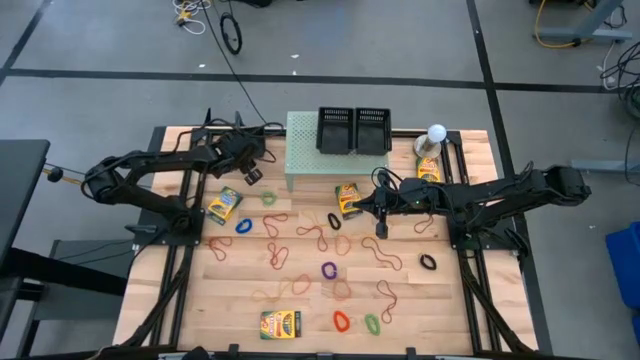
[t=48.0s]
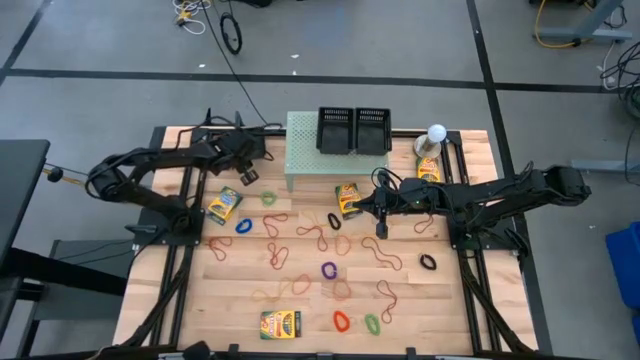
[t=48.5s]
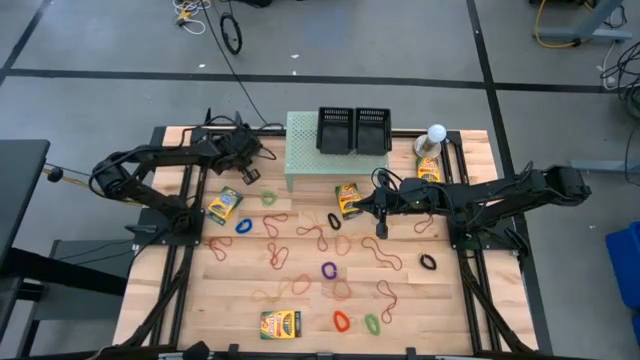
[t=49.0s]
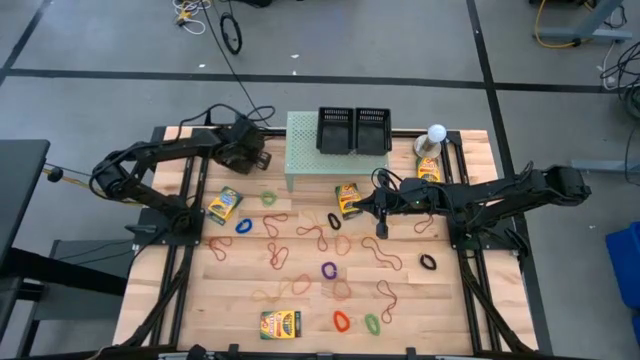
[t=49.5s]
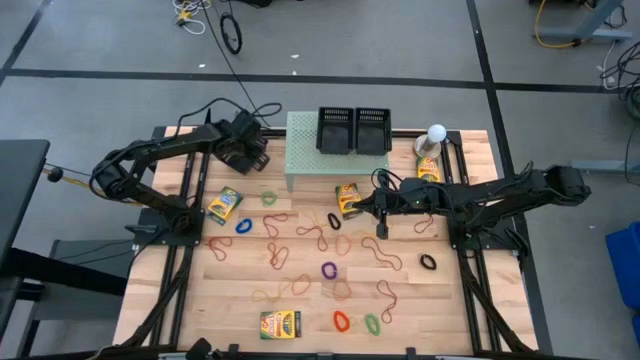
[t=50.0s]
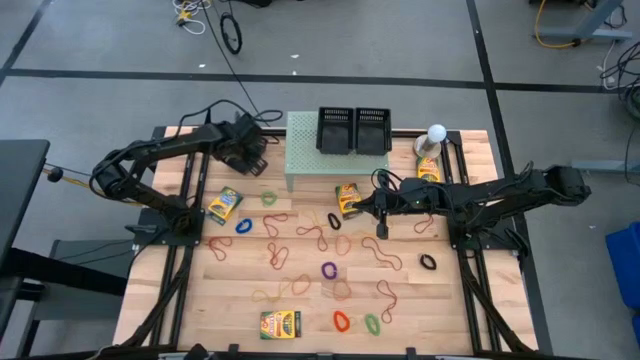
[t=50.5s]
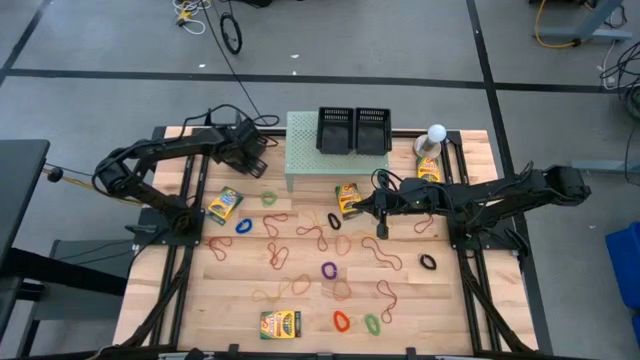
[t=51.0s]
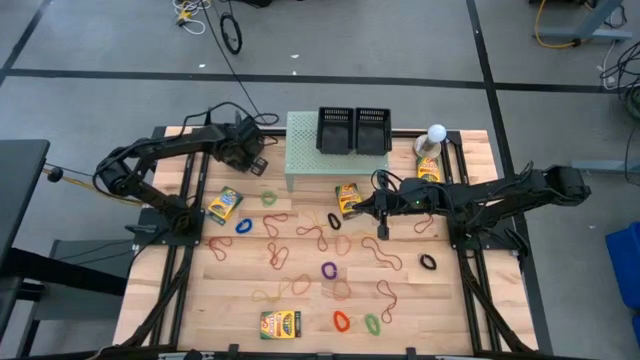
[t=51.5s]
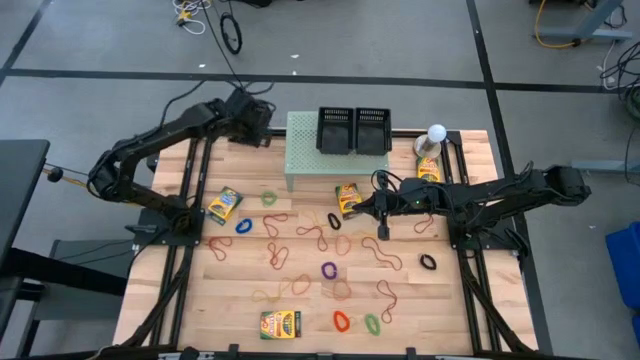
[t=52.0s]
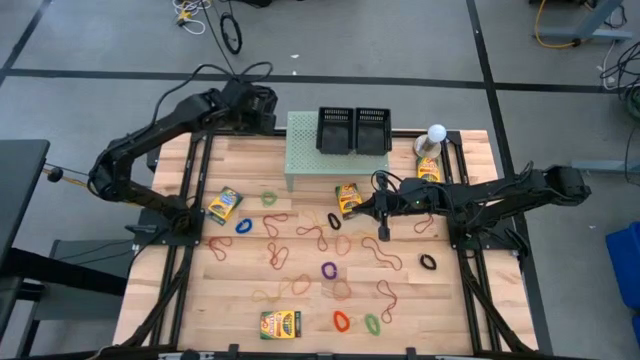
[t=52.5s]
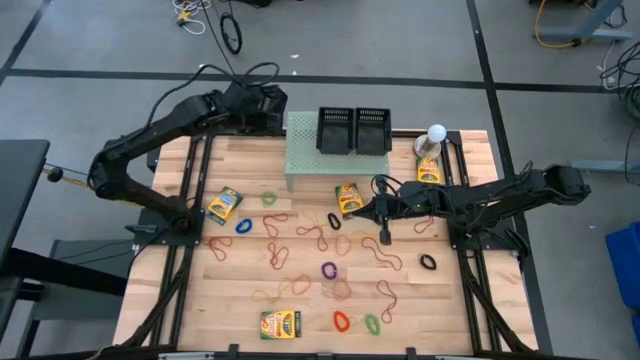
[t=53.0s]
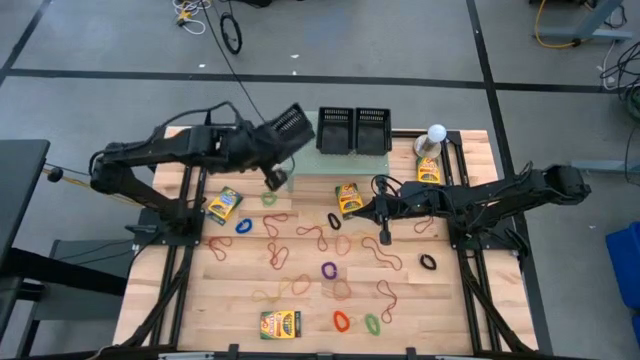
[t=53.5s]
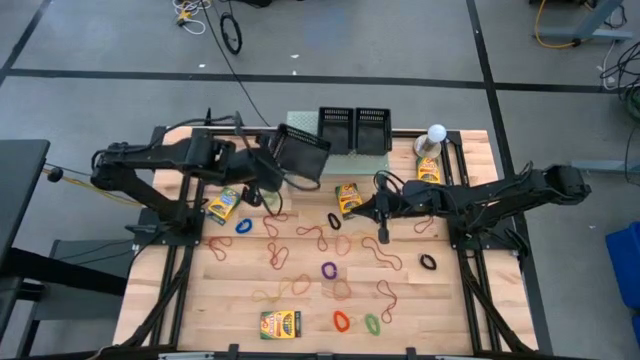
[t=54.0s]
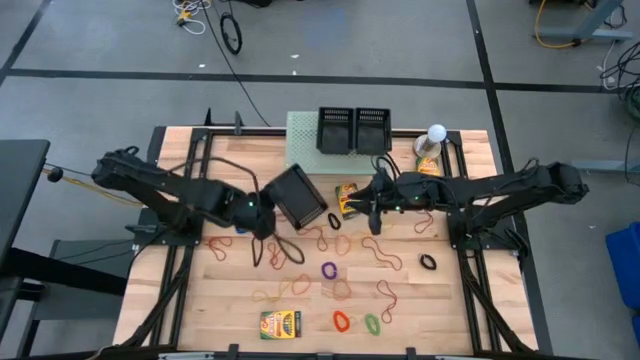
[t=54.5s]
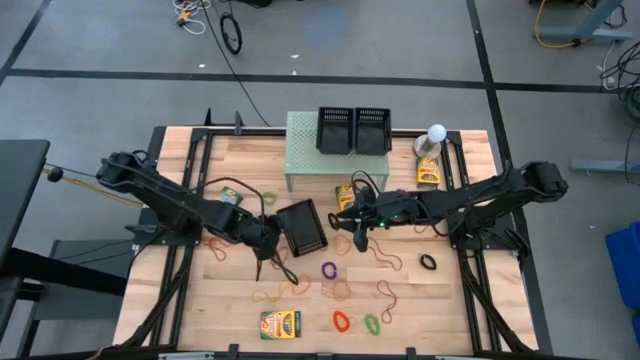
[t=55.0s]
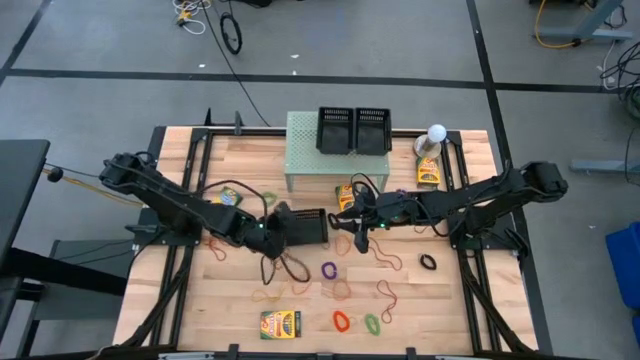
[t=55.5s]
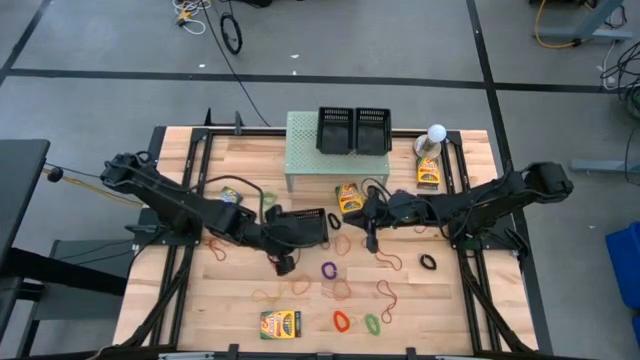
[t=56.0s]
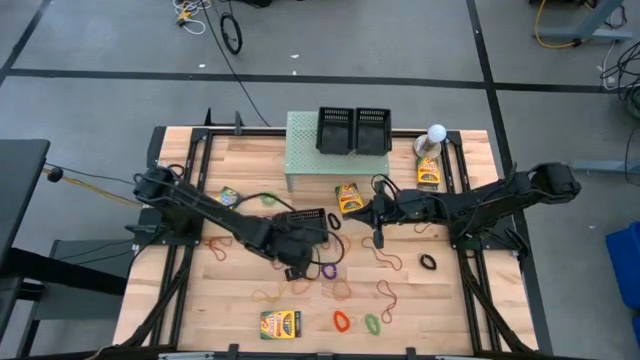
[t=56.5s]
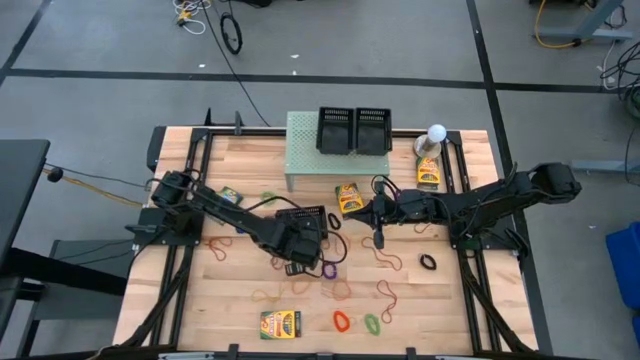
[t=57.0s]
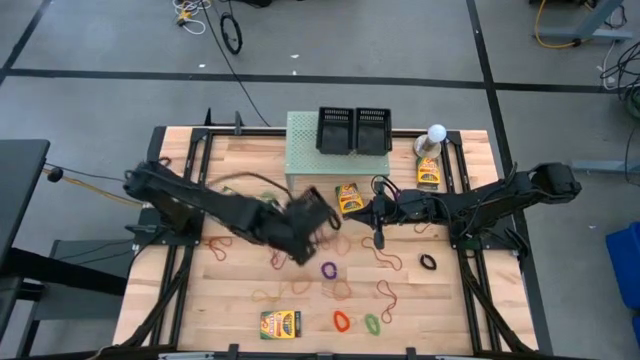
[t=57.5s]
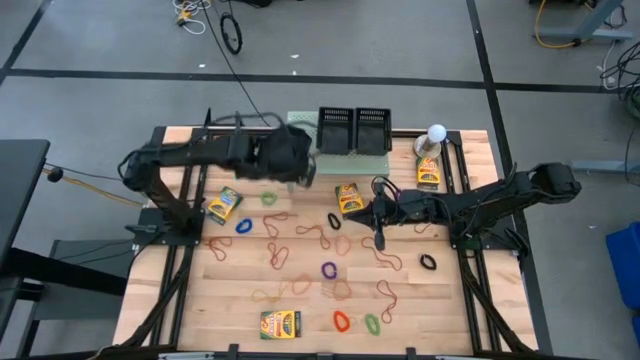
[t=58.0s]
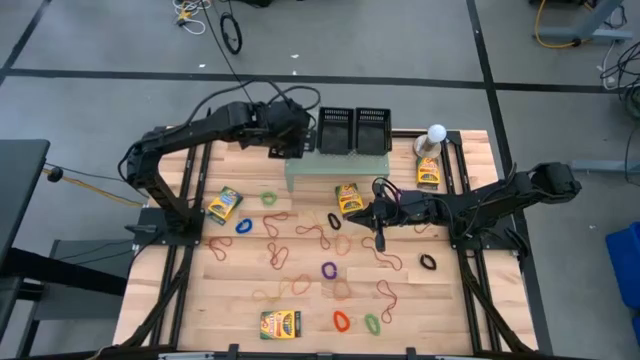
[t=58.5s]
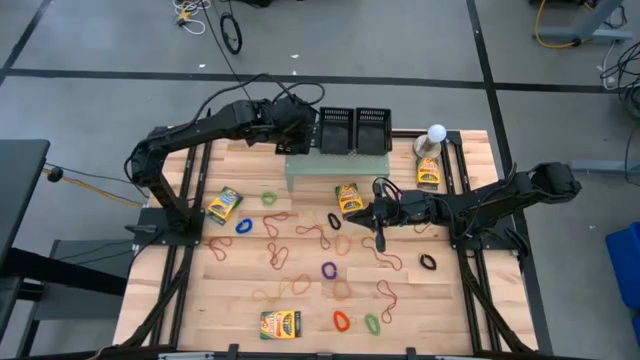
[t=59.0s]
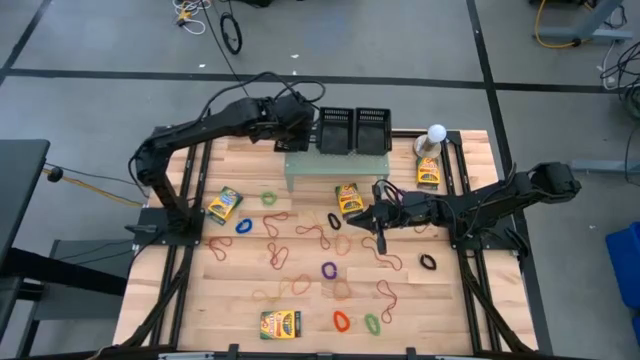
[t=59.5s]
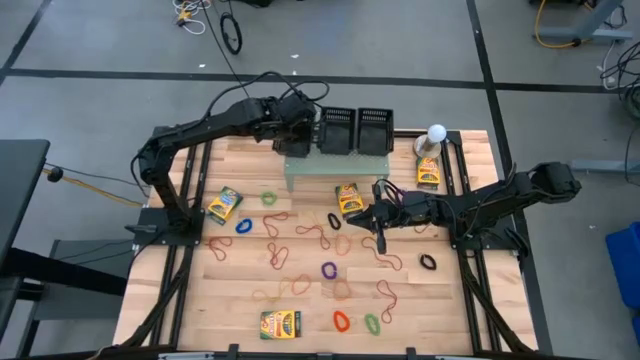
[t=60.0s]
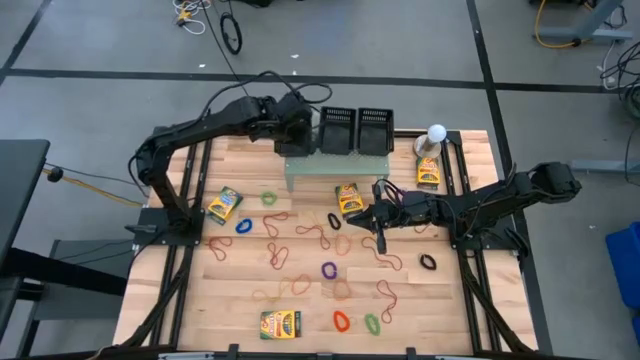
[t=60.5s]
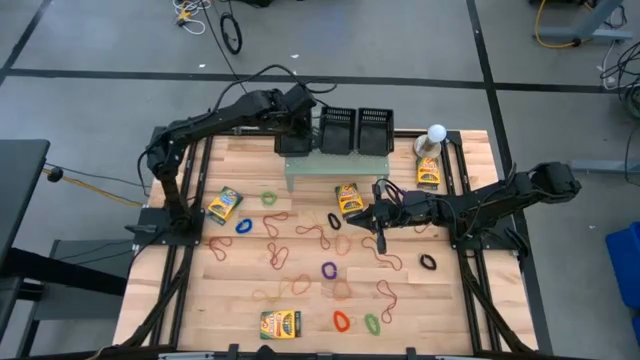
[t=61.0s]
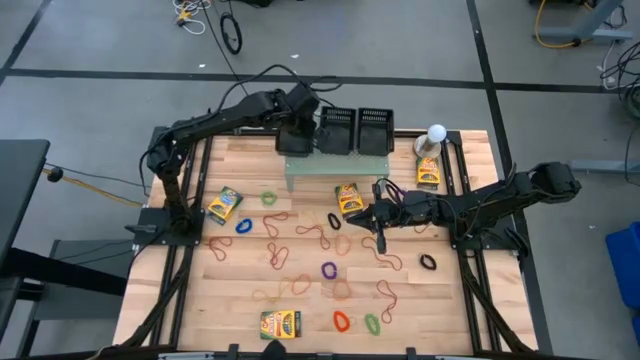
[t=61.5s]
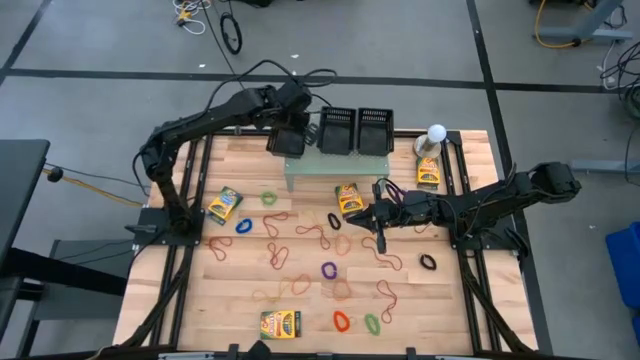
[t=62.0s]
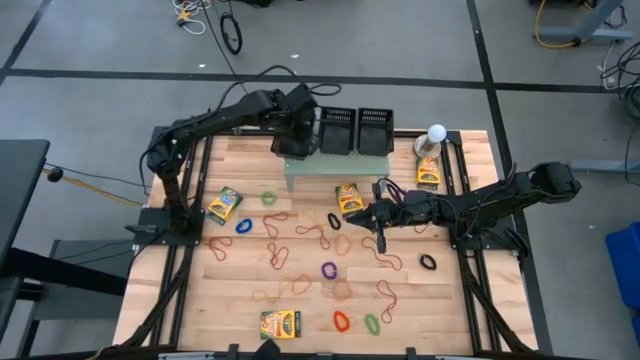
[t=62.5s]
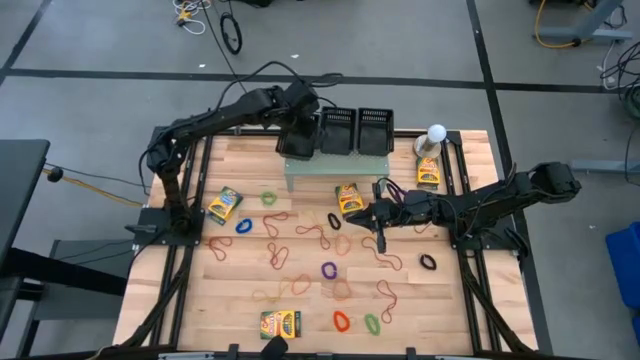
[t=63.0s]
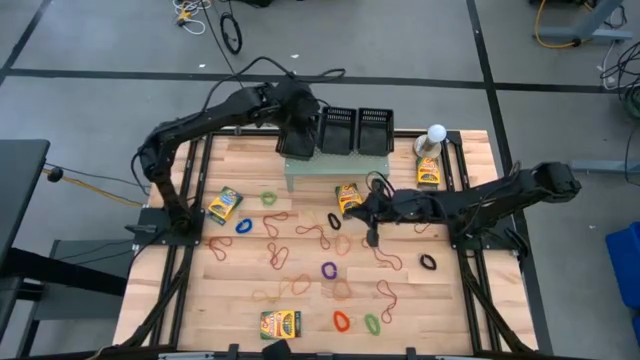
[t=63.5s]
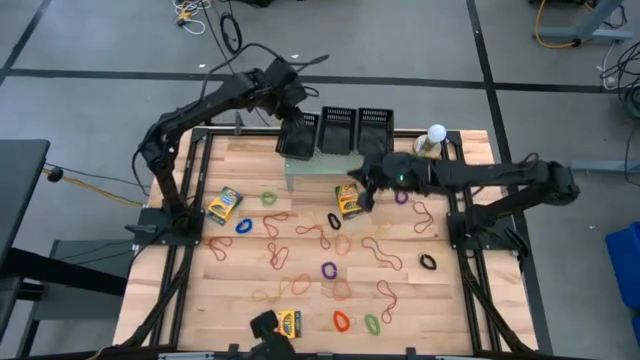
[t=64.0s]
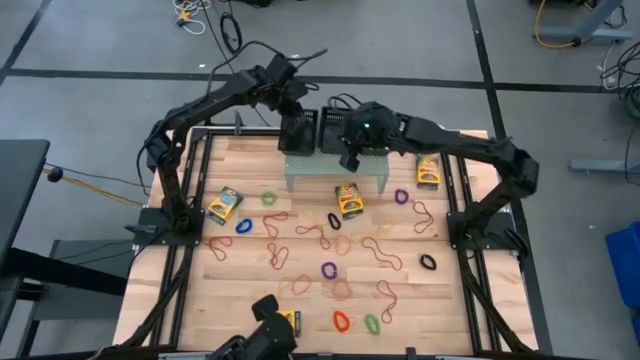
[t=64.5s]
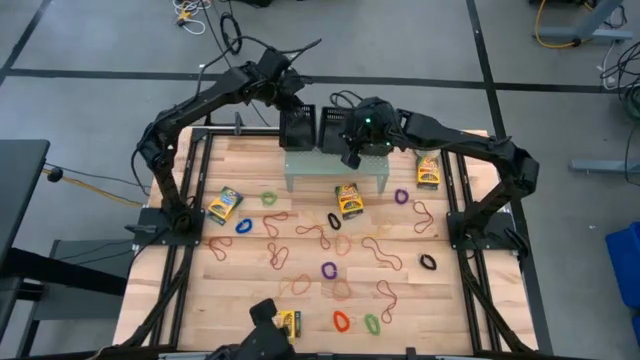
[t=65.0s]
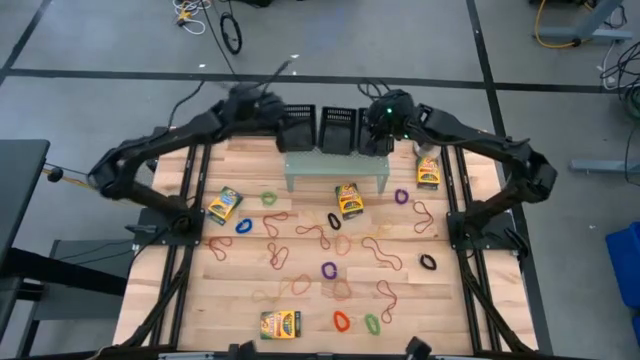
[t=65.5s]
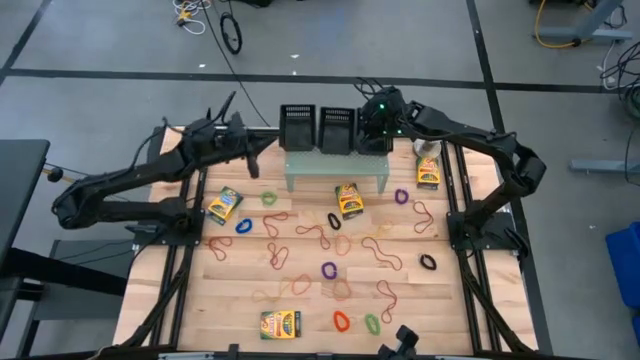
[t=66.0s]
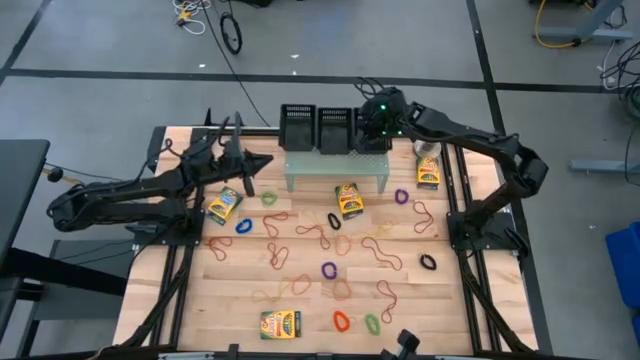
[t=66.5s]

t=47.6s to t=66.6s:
Task: Pick & Place Office Desk Supplies
Put the black bin on the shelf

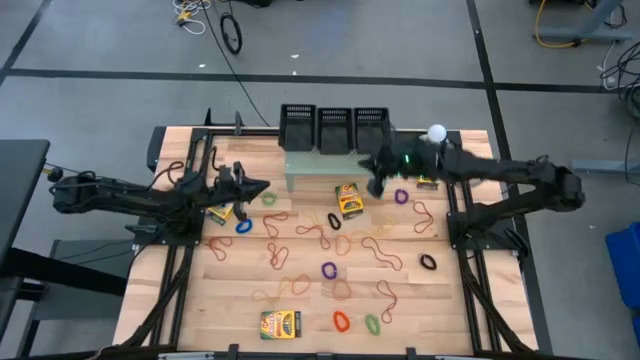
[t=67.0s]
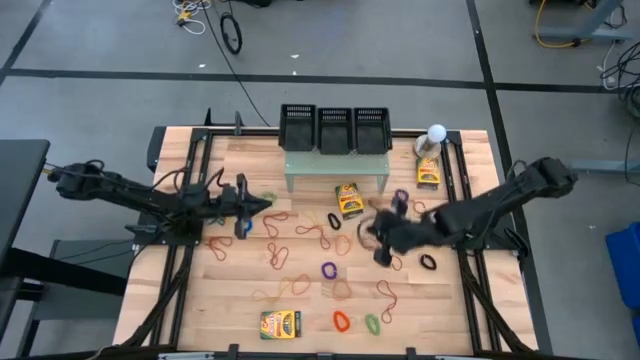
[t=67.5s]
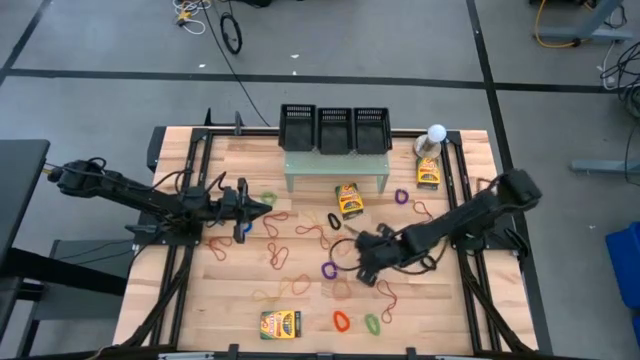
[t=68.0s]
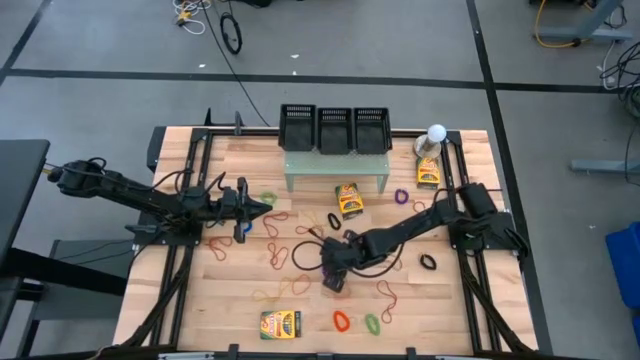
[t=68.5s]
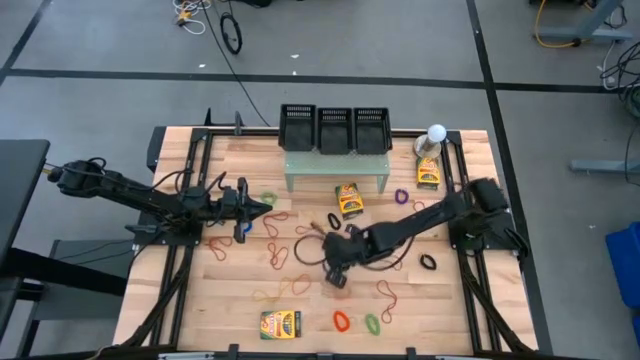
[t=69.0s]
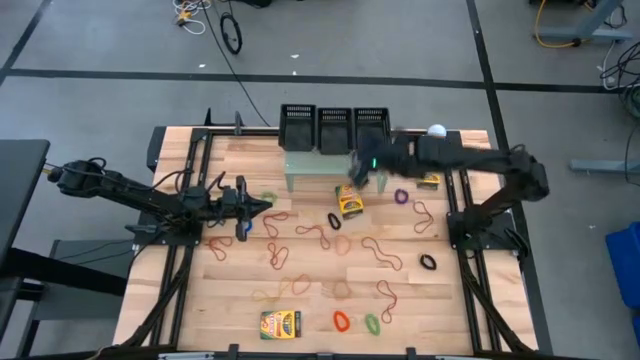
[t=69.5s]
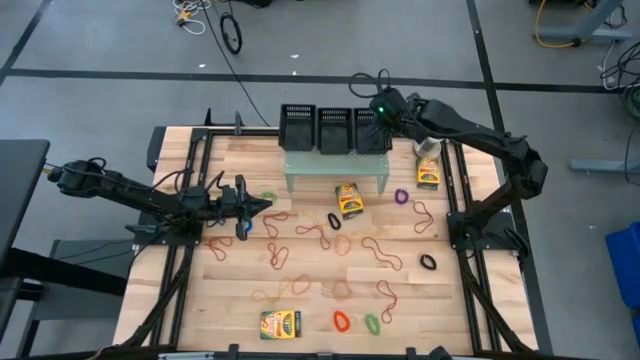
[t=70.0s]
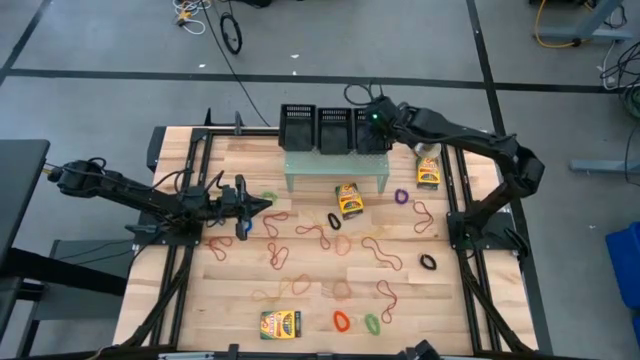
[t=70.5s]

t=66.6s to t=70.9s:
Put the violet spring bracelet into the right black bin on the shelf
